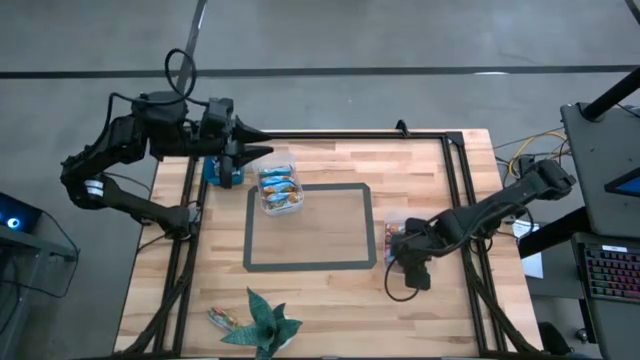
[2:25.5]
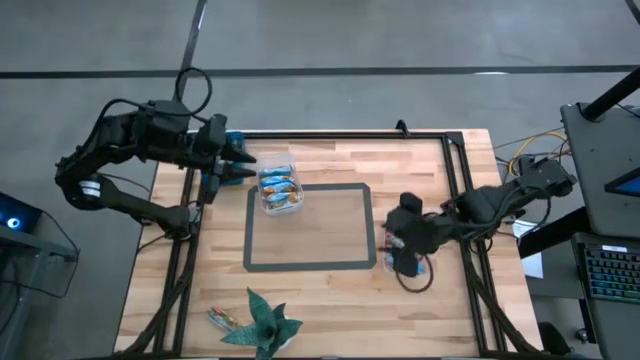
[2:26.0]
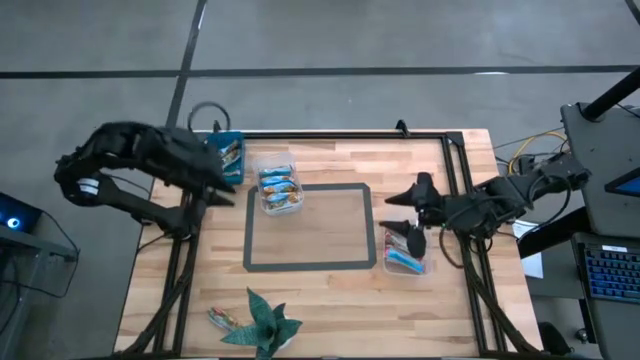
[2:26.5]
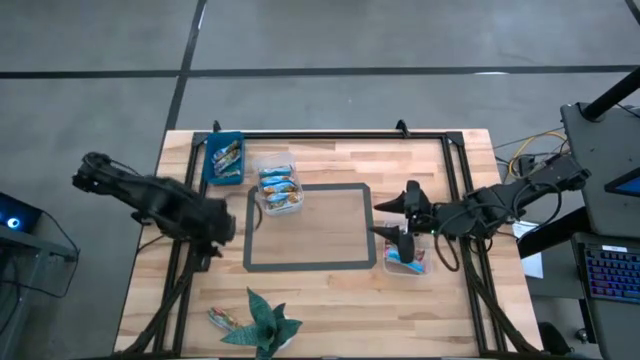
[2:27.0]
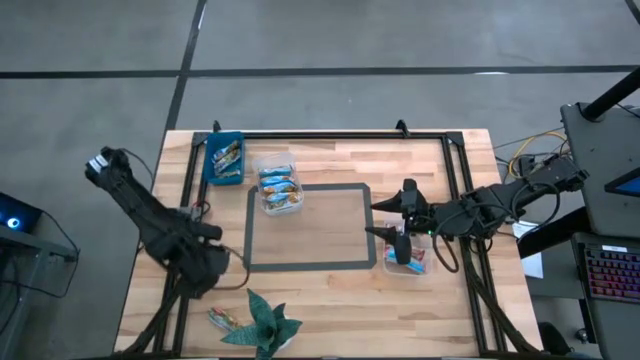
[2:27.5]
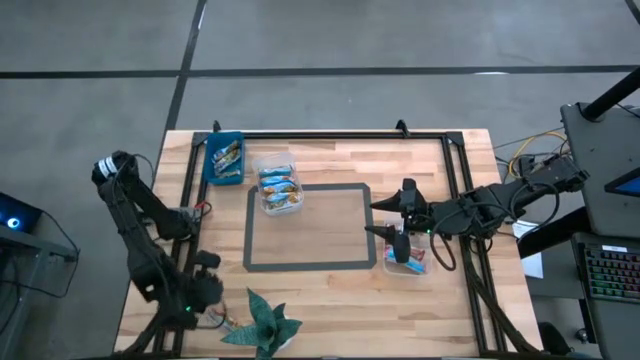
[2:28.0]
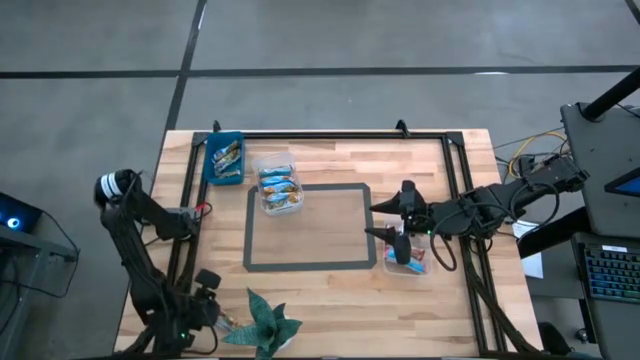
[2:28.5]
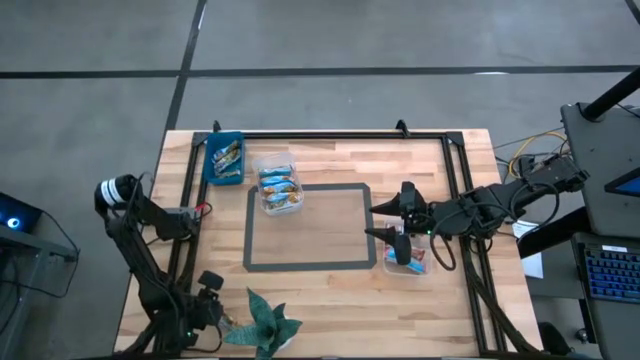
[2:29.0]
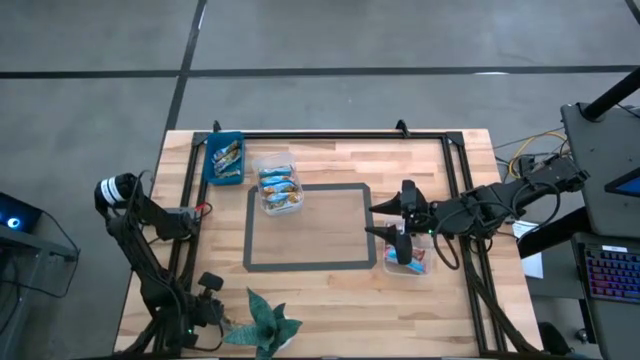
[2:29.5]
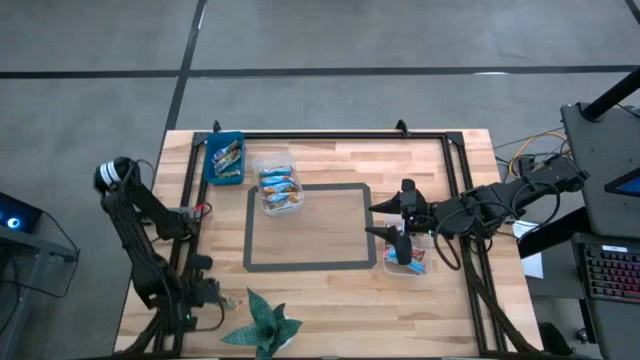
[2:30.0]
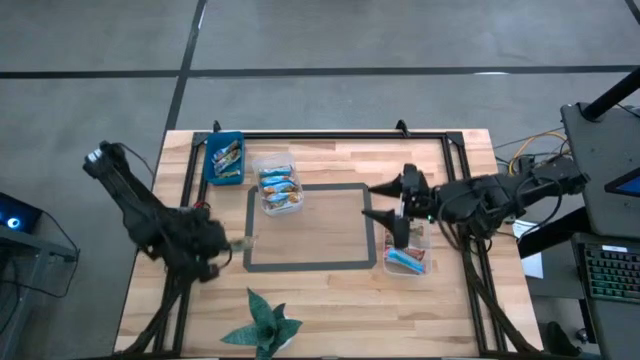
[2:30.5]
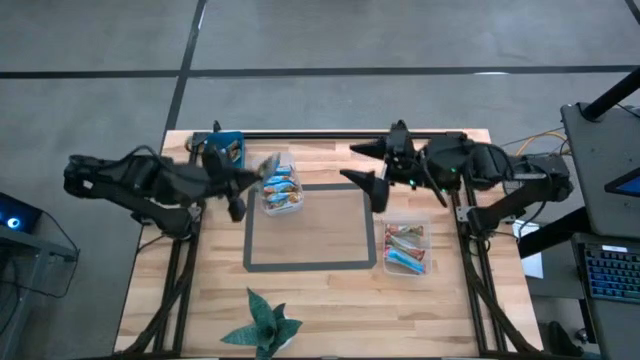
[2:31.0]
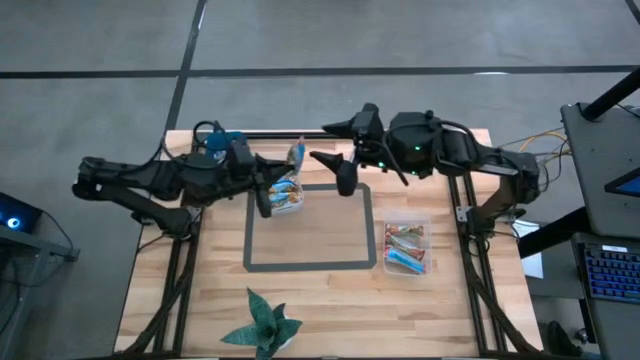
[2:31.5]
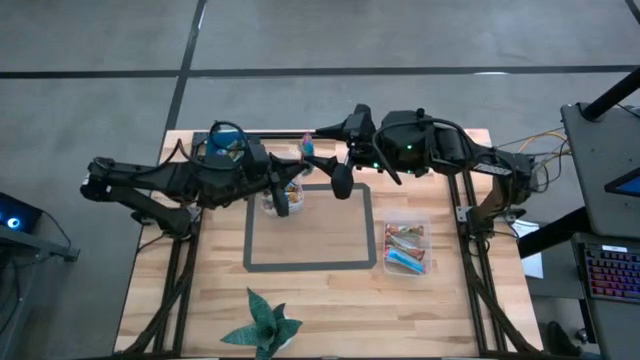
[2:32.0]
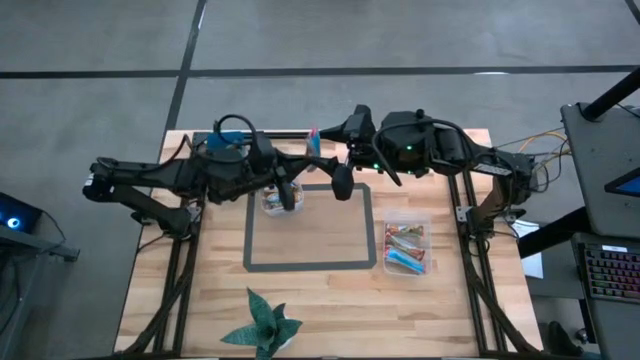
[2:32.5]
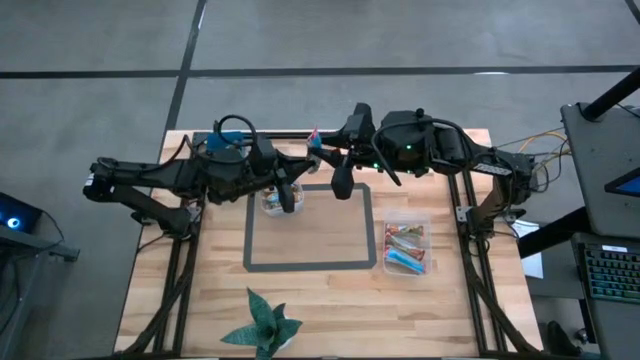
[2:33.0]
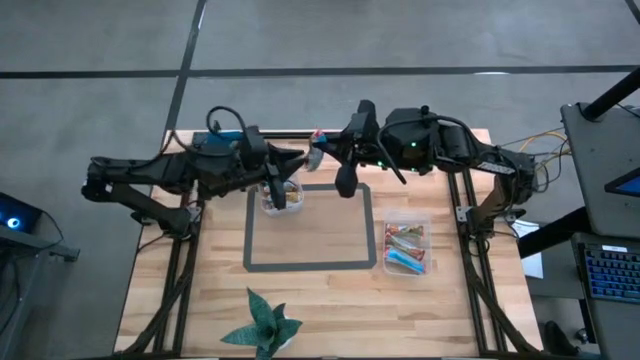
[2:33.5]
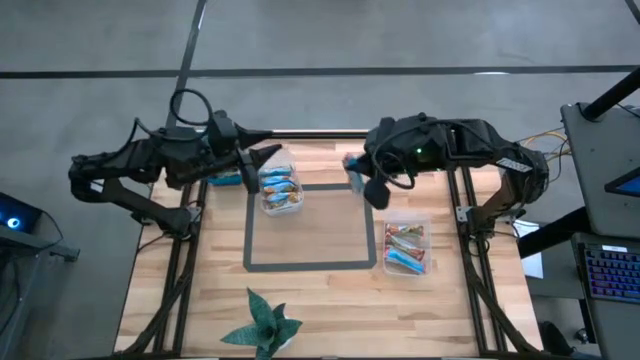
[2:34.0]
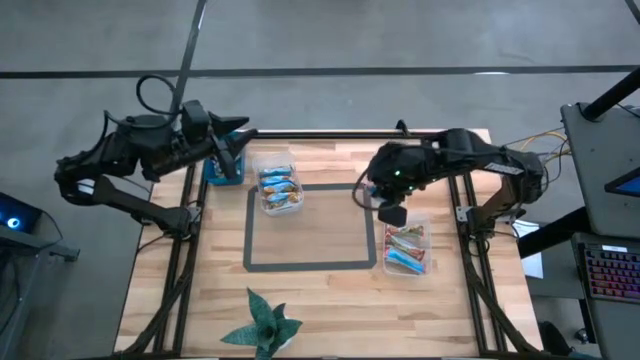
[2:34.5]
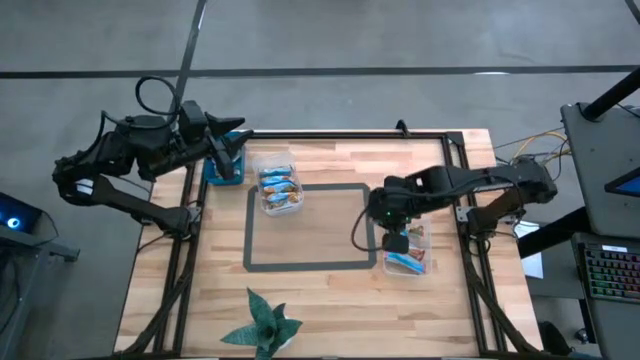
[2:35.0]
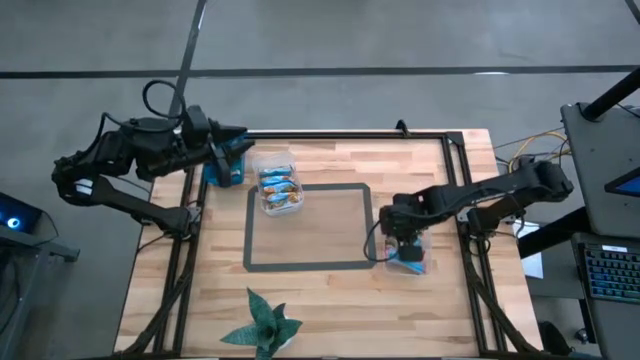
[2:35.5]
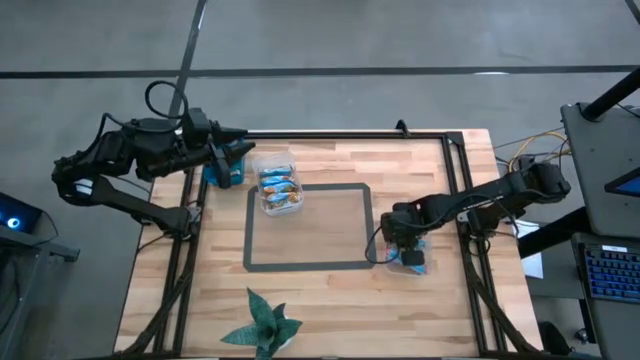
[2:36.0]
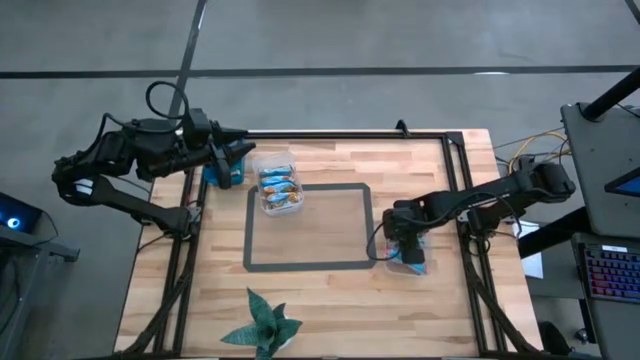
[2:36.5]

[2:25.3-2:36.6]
Task: Pick and place Granola Bars by type
Put the red granola bar into the right transparent bin

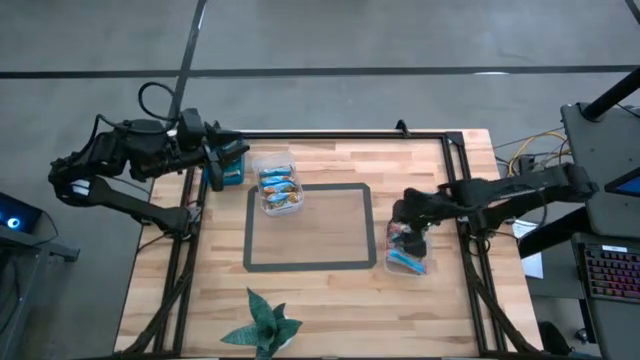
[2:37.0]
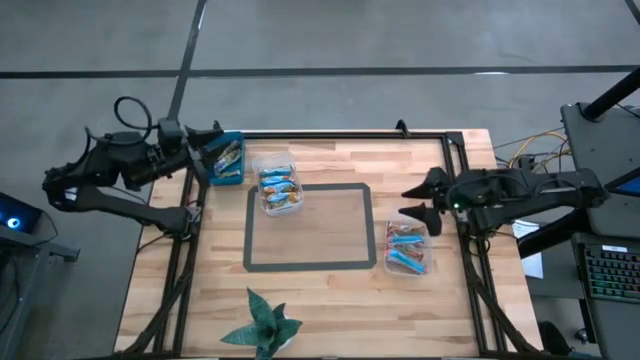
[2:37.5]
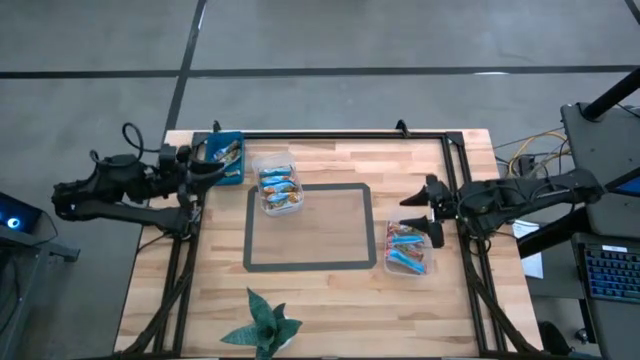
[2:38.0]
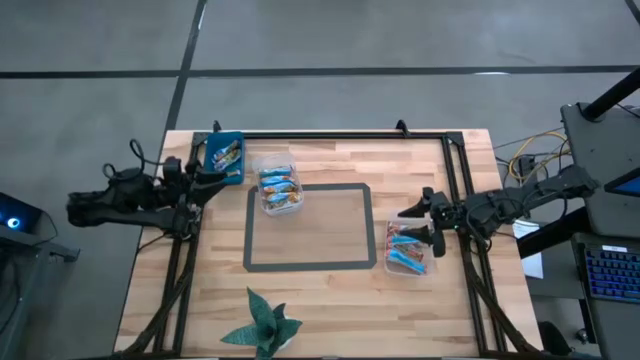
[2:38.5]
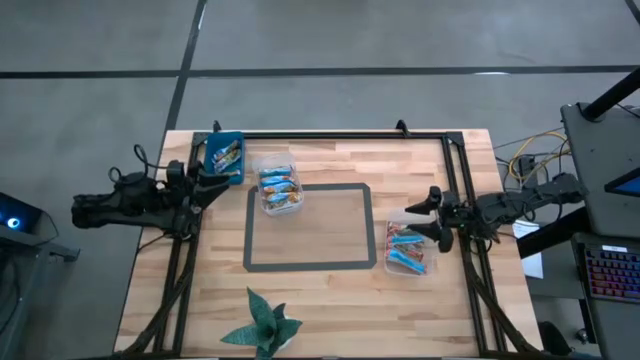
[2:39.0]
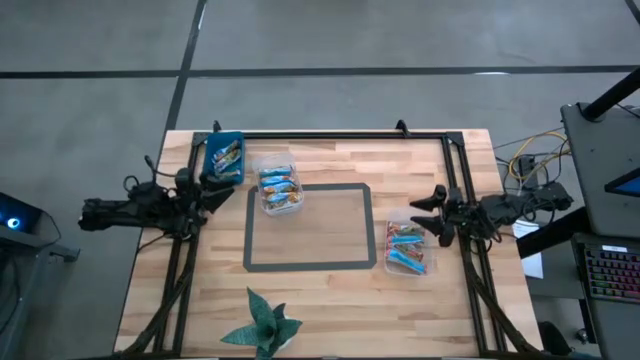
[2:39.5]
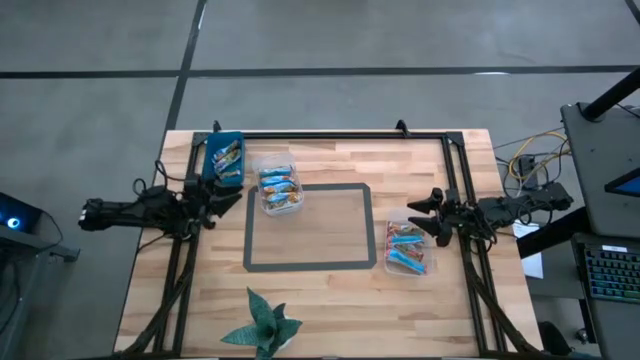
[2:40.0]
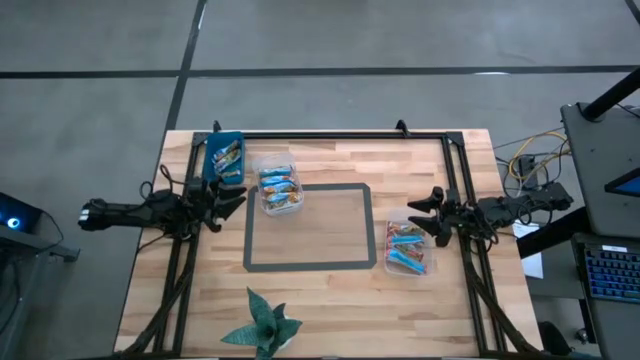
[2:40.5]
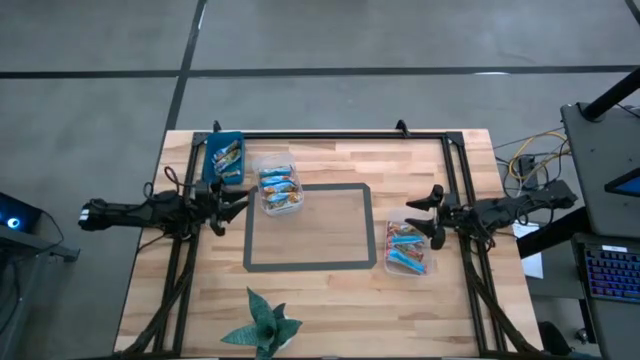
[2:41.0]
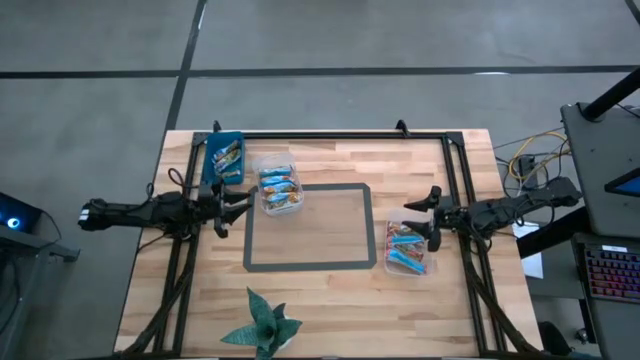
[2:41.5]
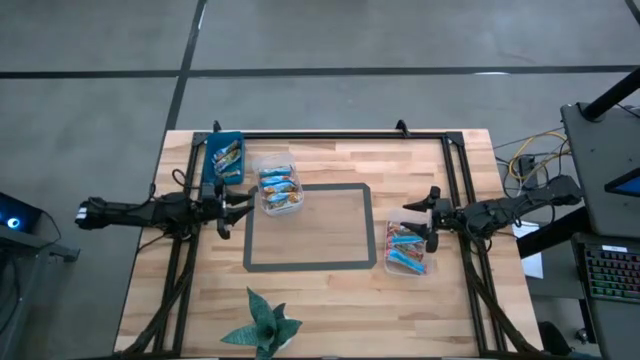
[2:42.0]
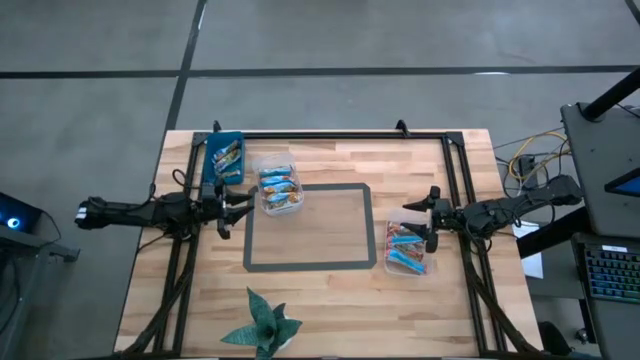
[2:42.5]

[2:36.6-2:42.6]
Return to Home Position

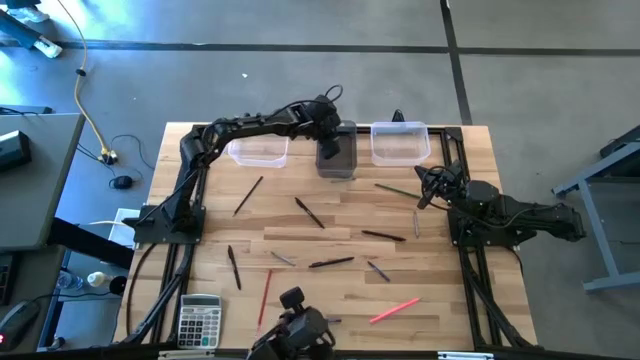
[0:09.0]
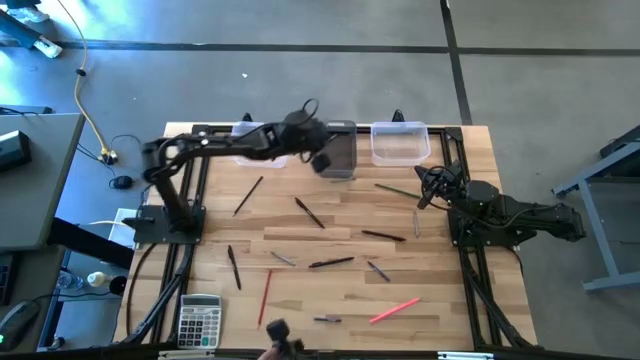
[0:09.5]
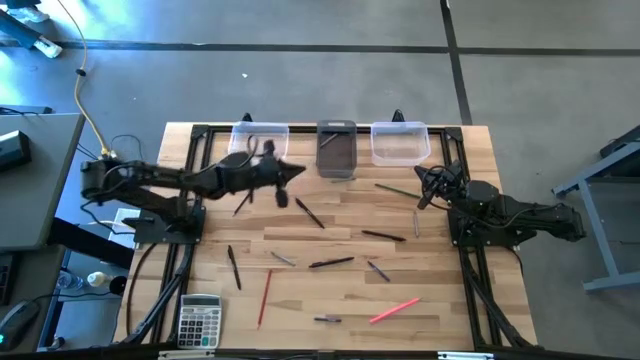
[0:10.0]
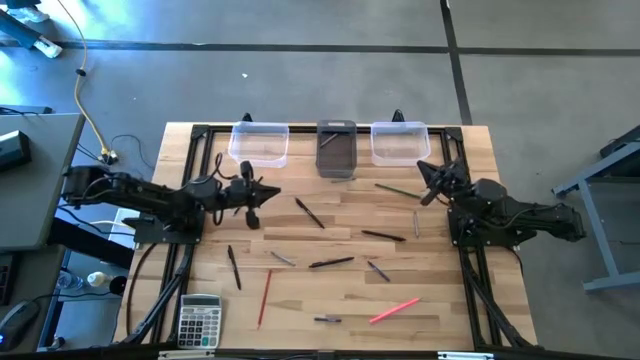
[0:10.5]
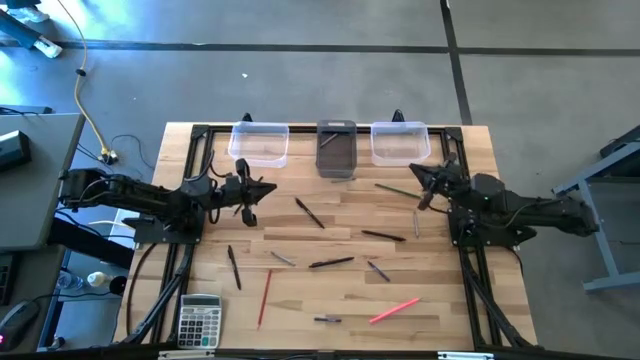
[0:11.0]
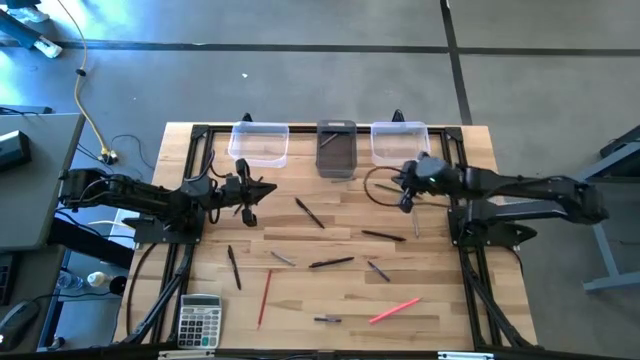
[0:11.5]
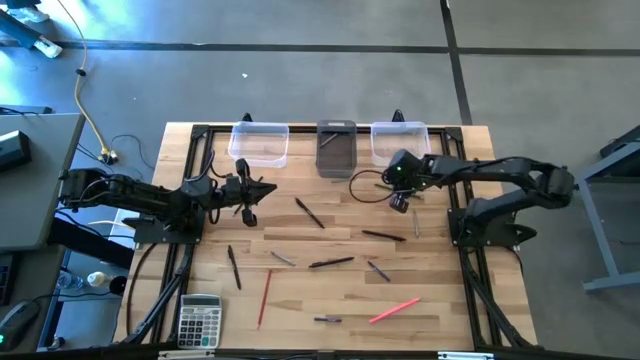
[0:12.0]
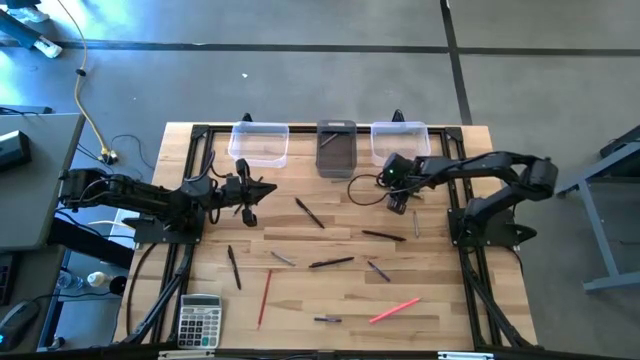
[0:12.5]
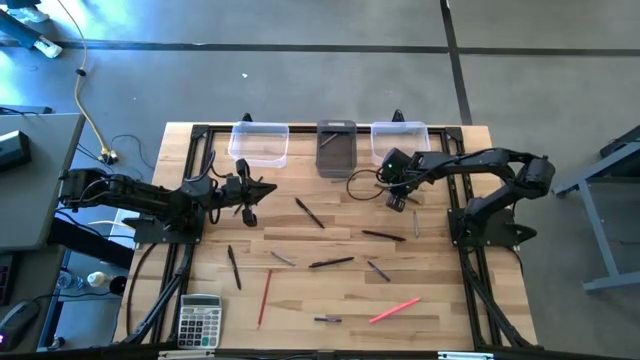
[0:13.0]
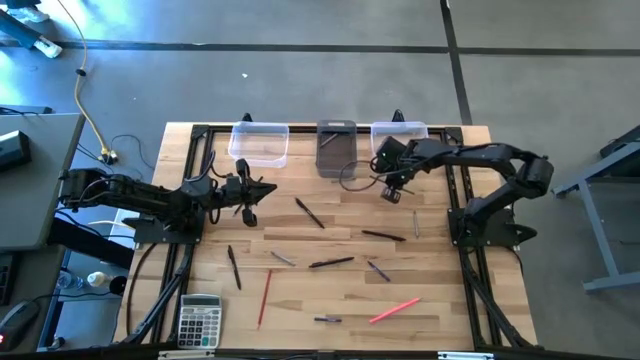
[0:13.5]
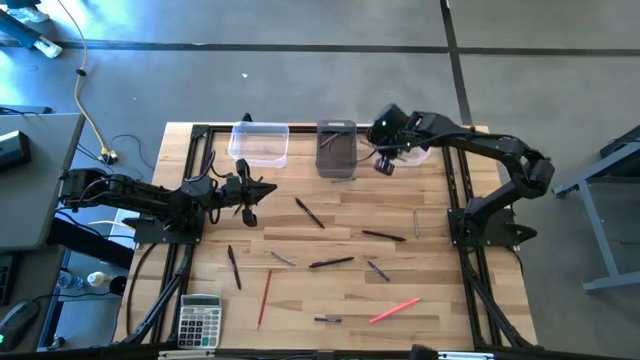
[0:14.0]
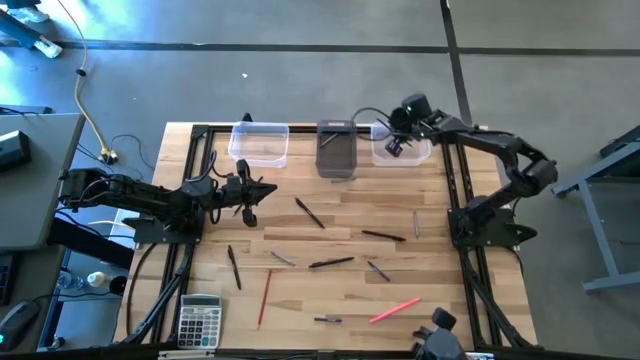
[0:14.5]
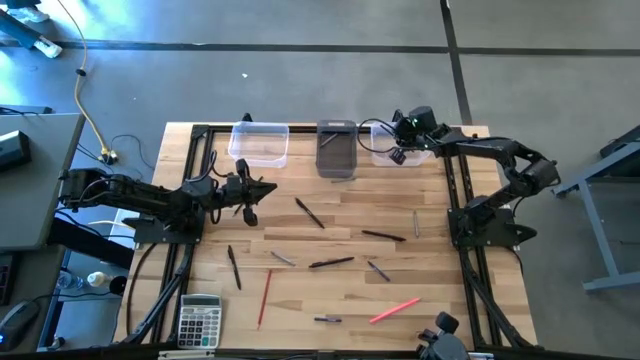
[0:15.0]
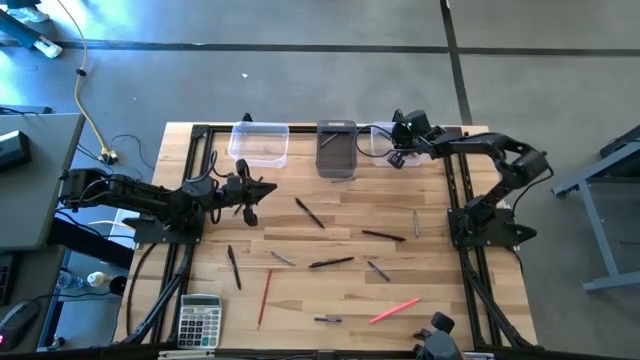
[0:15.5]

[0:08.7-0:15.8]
Task: Sort crayons/erasers/pens/pencils in bins
Put the green pencil into the right transparent bin
